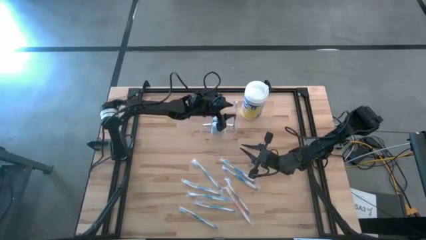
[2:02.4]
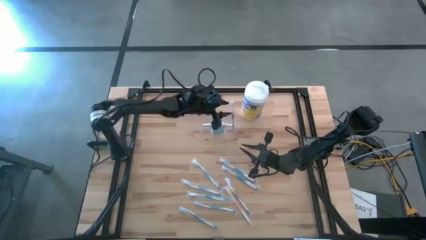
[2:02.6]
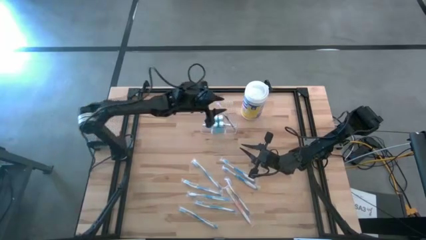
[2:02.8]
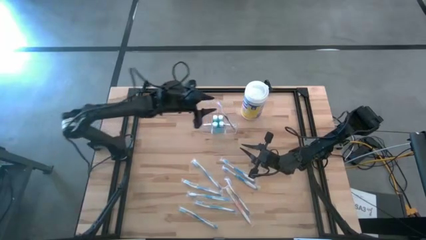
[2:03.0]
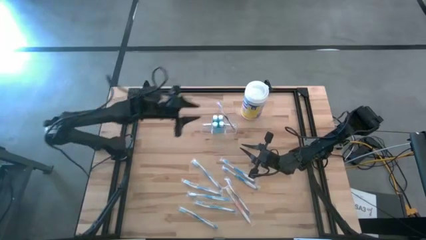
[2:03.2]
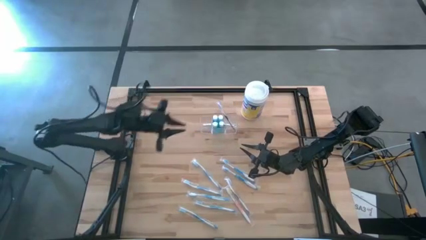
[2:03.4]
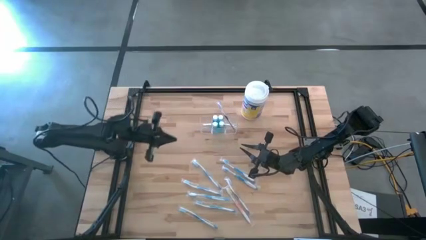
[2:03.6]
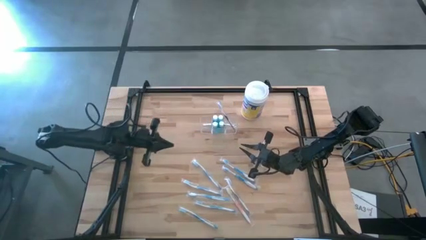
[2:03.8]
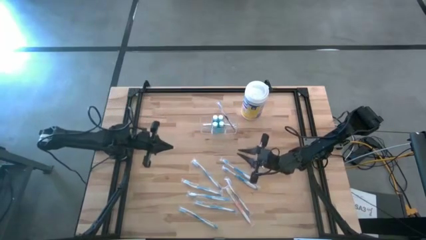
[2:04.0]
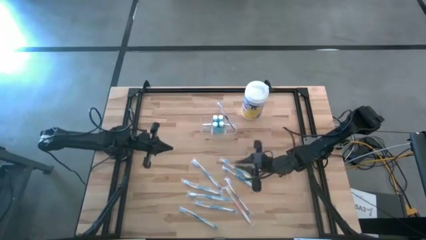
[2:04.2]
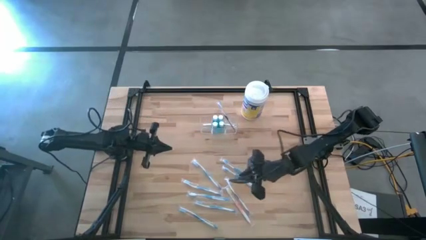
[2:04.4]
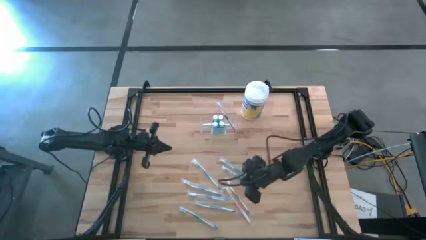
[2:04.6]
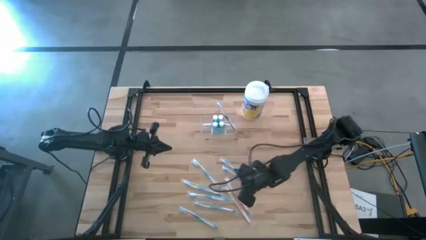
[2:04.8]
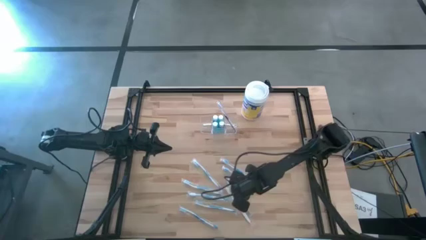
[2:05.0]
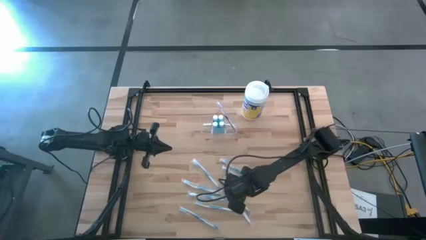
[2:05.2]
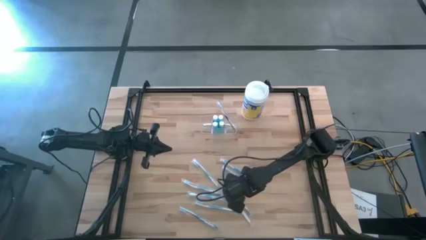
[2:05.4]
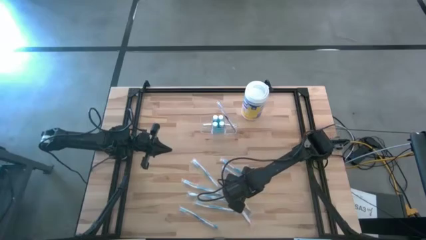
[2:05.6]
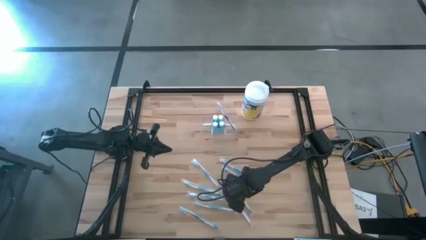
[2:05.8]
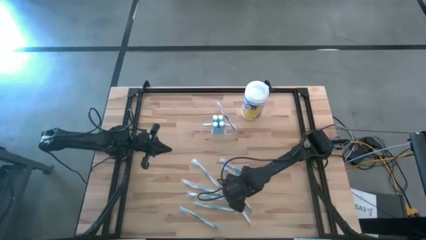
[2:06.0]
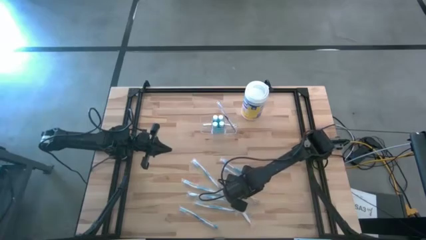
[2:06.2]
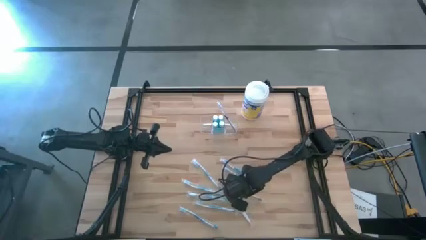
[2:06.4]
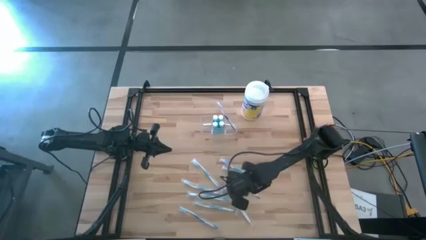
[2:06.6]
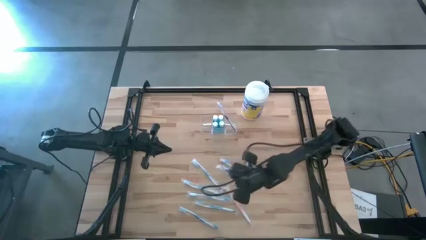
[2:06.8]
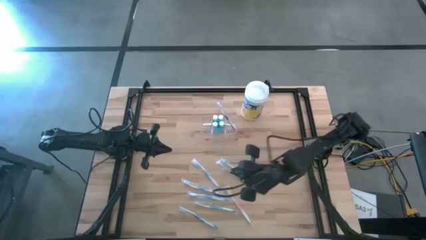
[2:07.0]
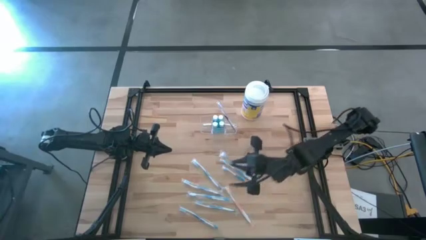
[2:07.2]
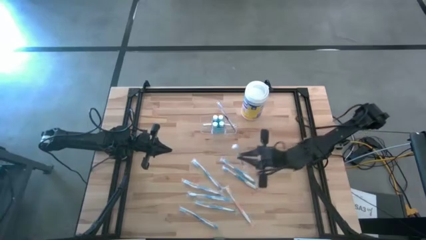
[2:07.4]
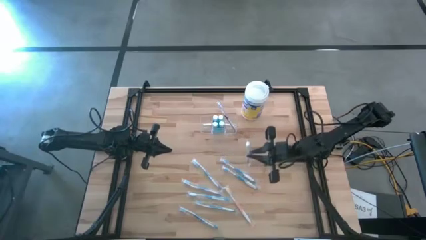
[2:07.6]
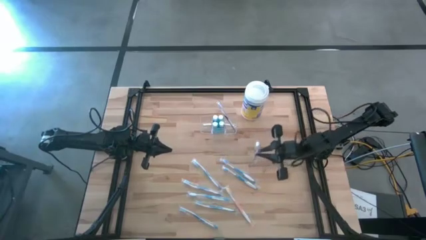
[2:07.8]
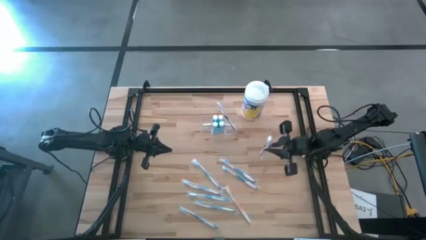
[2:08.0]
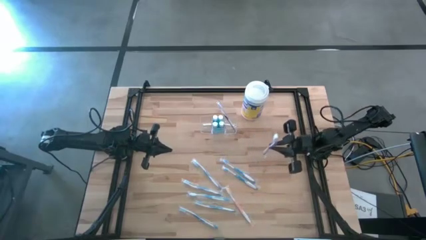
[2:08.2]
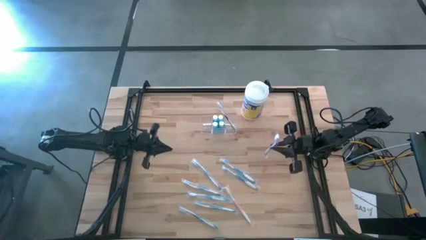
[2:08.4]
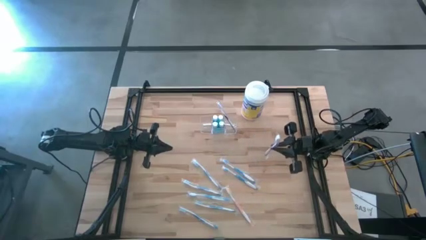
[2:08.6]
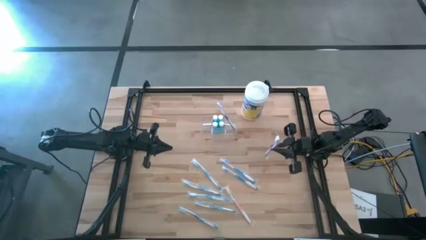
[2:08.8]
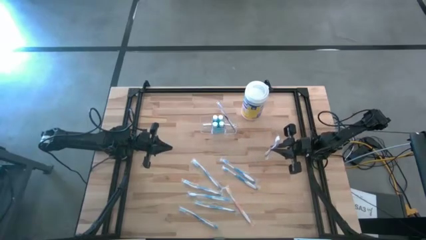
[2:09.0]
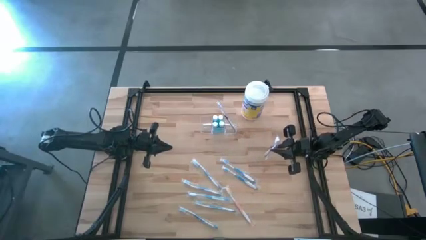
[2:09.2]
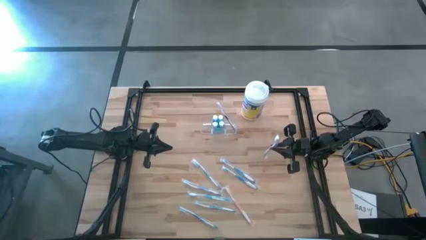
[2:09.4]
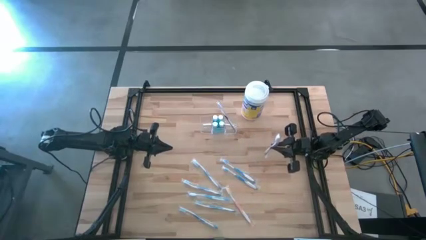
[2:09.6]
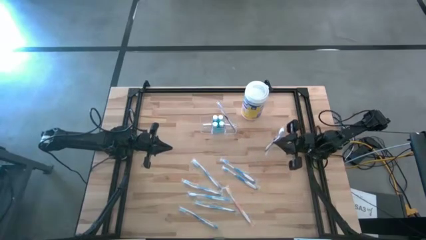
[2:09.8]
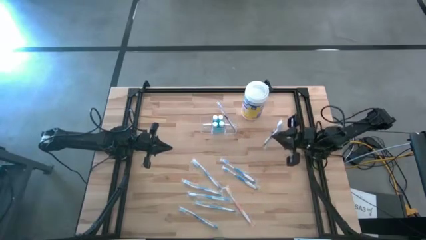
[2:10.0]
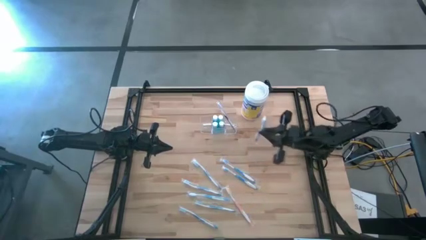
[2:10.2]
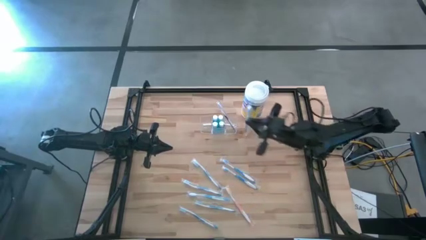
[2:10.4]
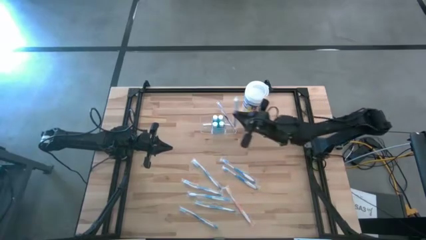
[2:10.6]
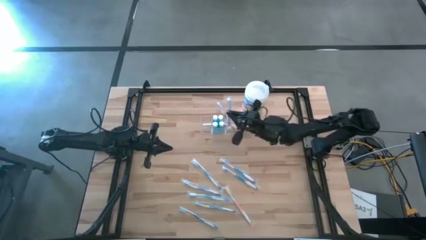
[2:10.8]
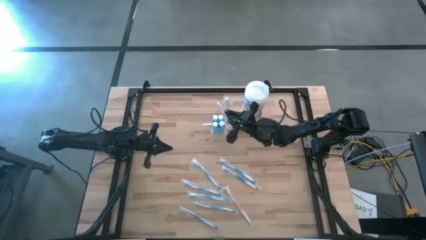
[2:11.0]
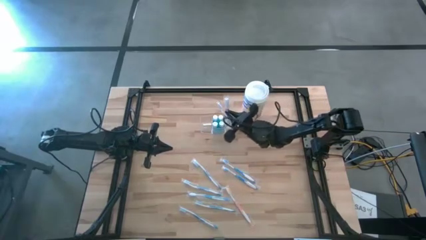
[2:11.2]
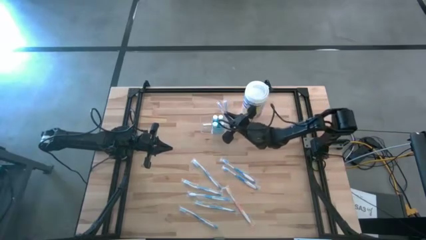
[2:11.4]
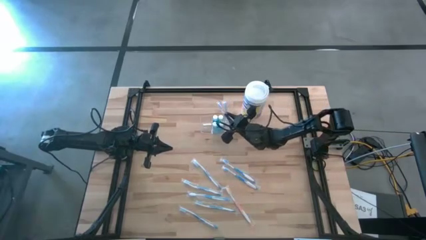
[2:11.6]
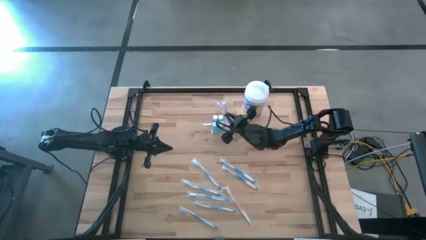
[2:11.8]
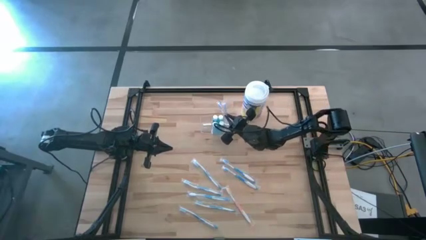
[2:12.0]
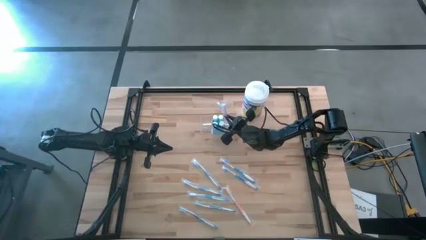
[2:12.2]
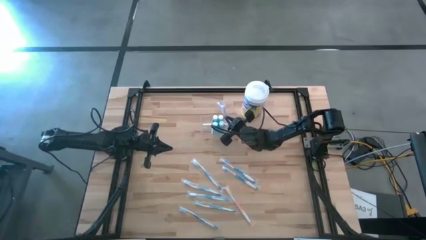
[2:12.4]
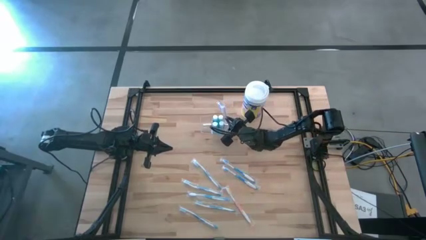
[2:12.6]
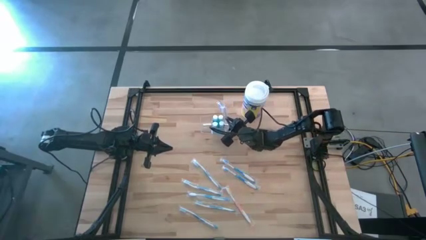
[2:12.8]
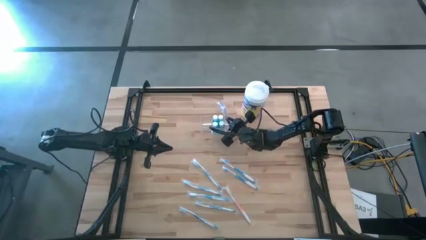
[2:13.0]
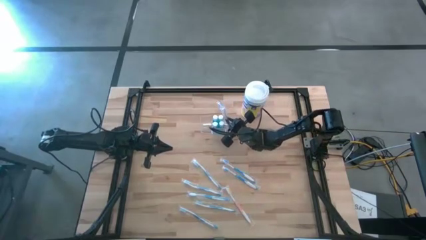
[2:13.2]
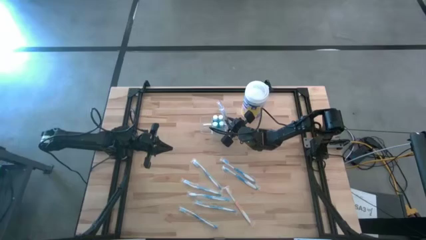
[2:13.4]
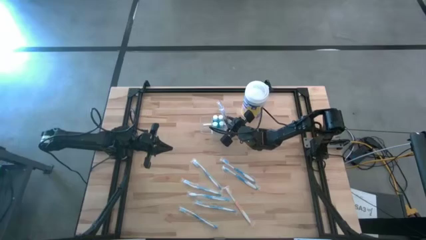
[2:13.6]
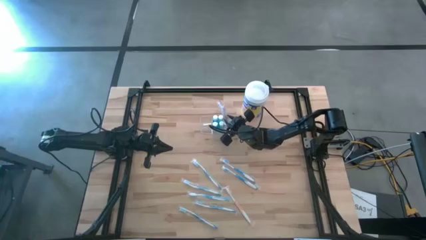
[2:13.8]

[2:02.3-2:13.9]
Task: Pick & Place toothbrushing station
Put the violet toothbrush into the transparent organizer
